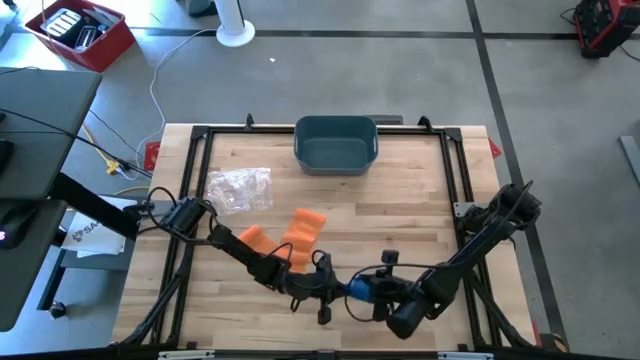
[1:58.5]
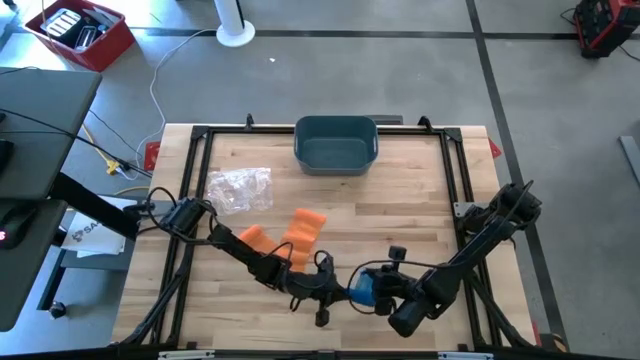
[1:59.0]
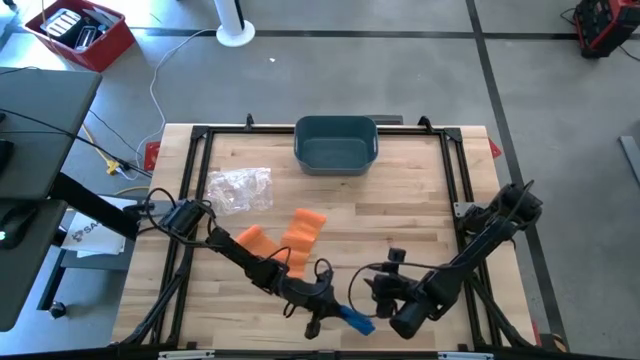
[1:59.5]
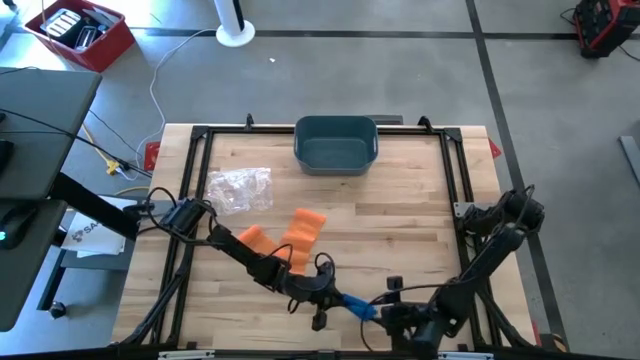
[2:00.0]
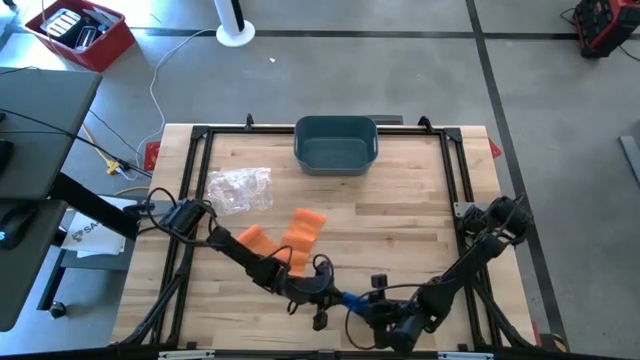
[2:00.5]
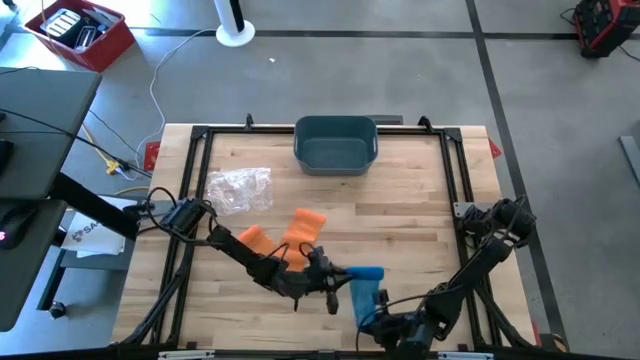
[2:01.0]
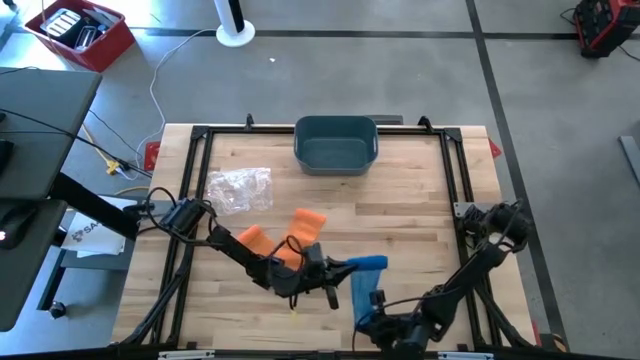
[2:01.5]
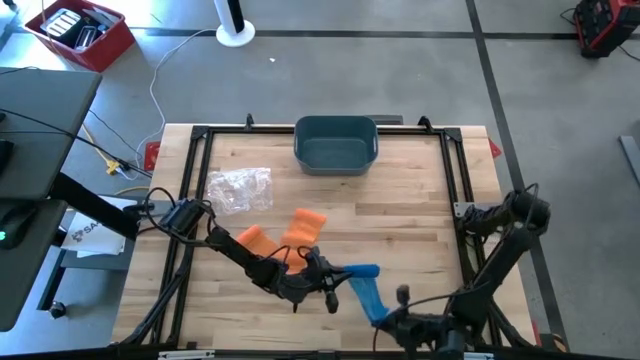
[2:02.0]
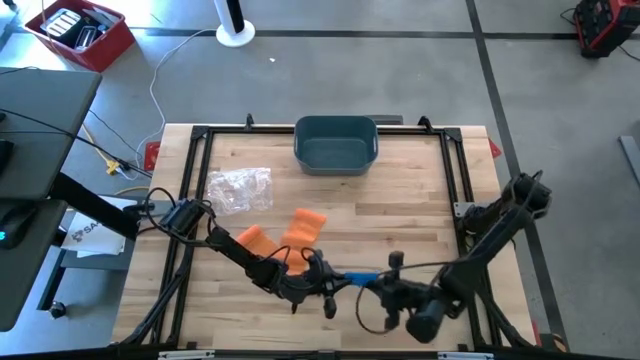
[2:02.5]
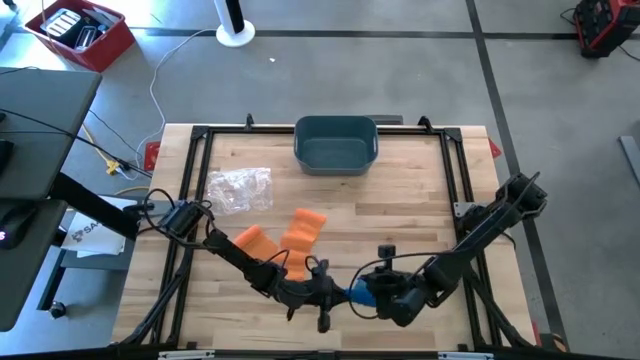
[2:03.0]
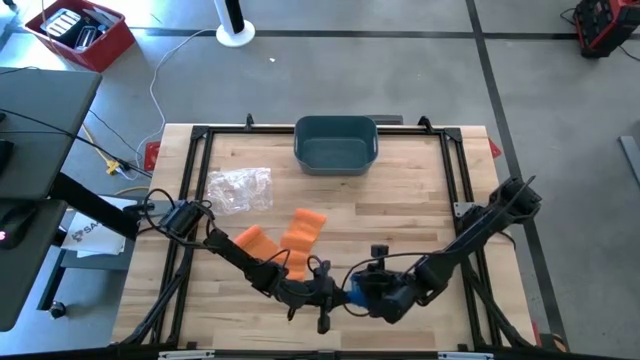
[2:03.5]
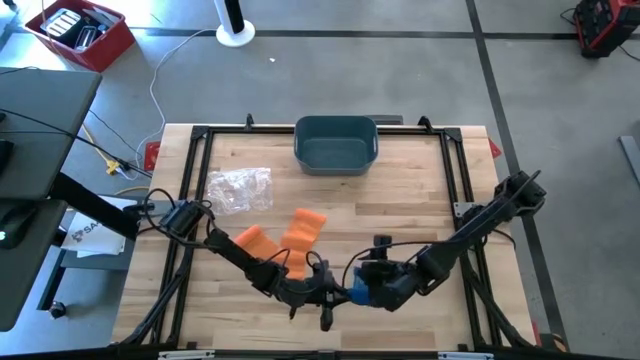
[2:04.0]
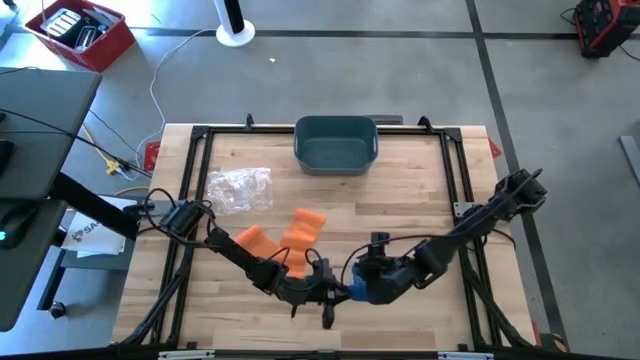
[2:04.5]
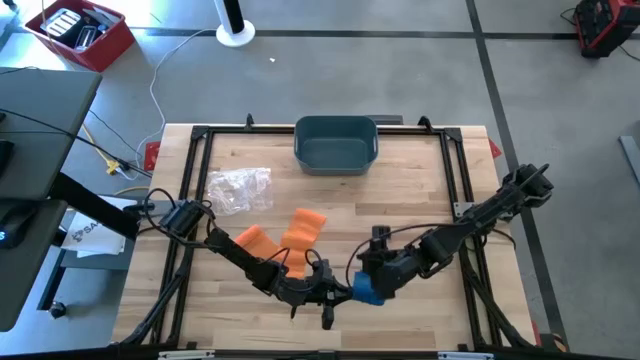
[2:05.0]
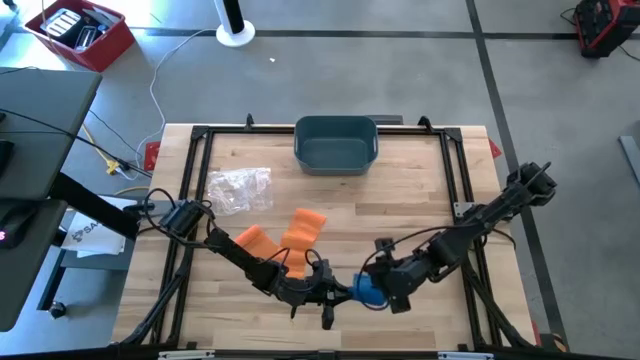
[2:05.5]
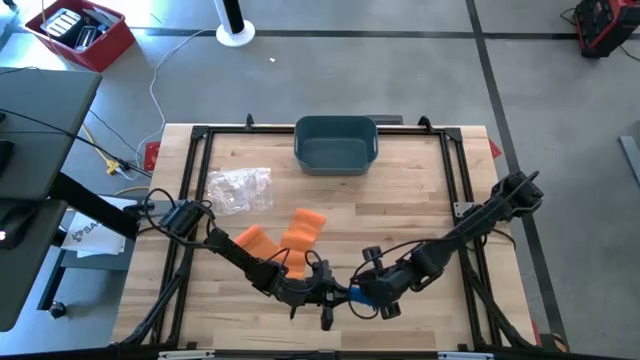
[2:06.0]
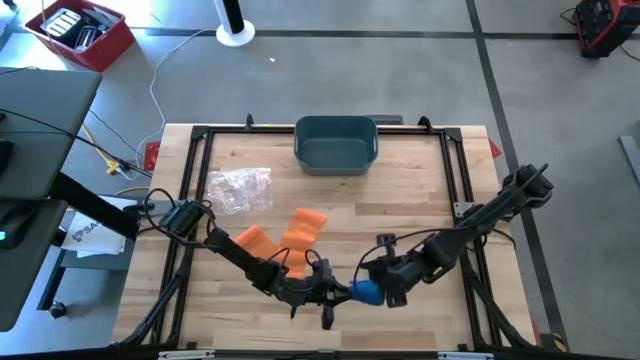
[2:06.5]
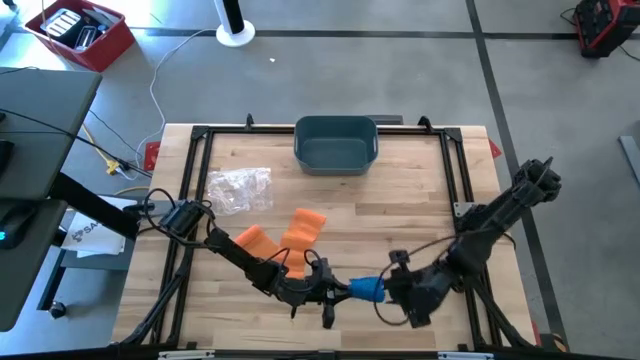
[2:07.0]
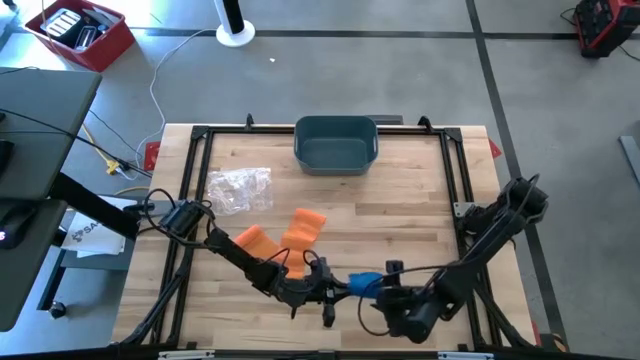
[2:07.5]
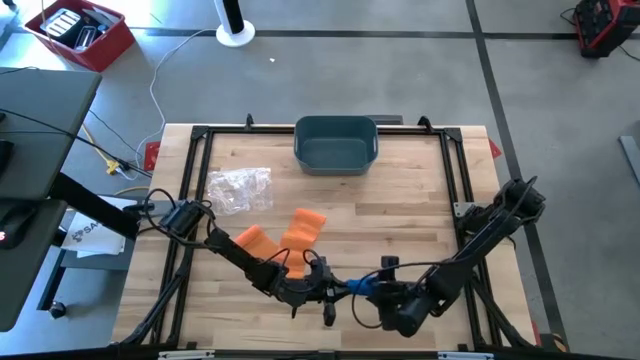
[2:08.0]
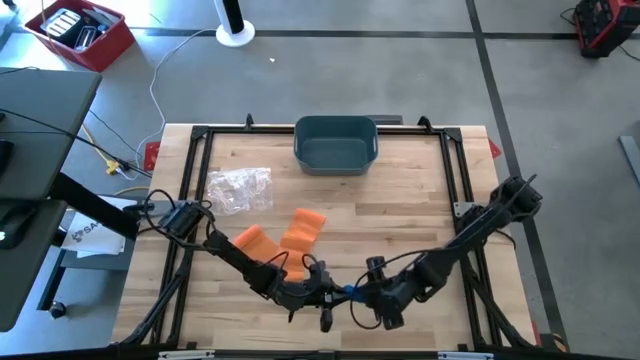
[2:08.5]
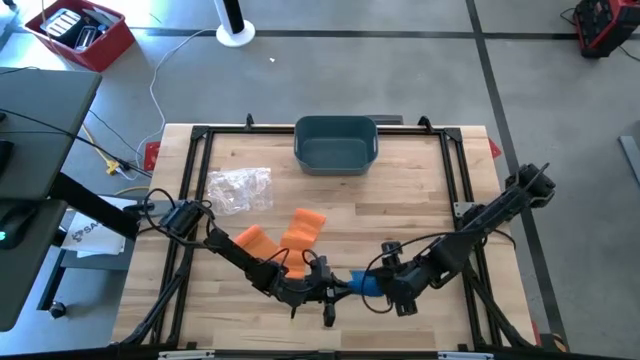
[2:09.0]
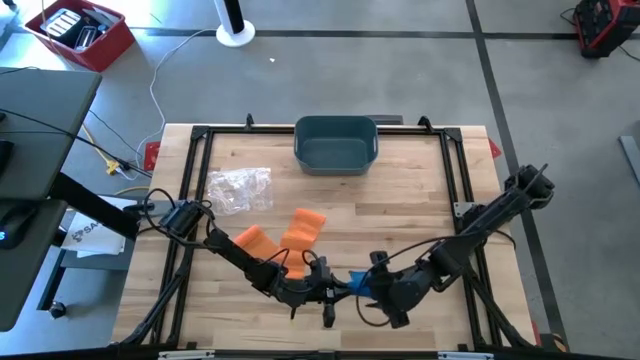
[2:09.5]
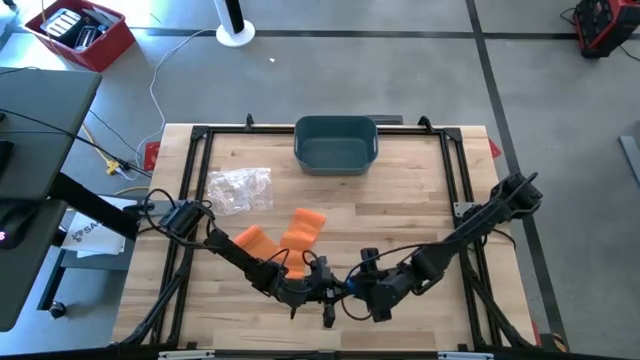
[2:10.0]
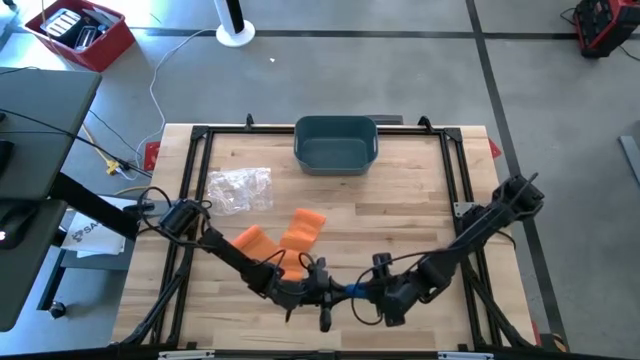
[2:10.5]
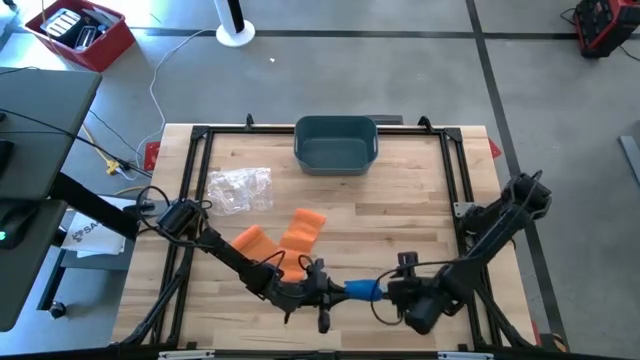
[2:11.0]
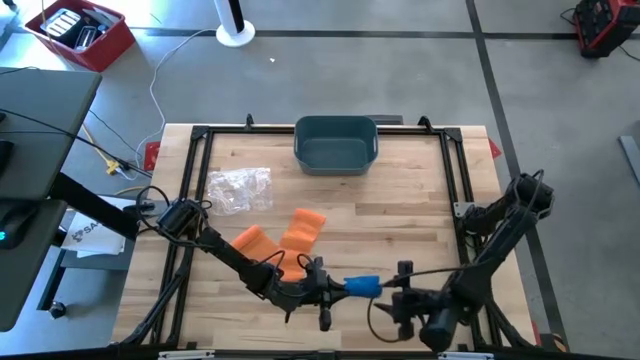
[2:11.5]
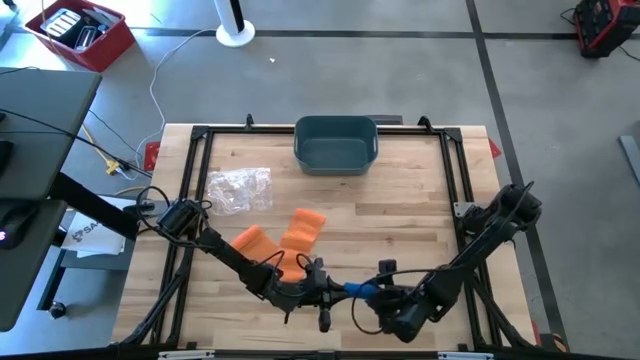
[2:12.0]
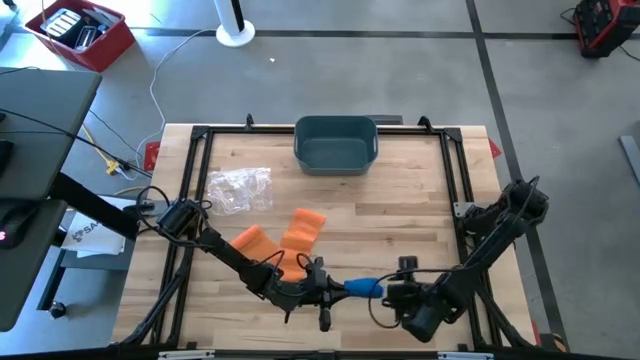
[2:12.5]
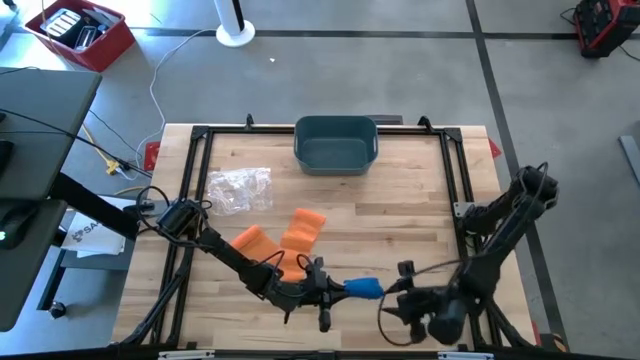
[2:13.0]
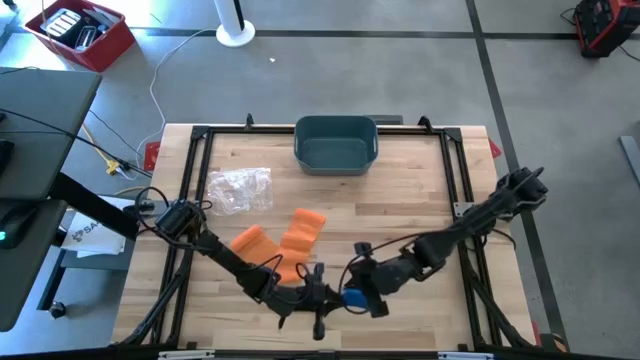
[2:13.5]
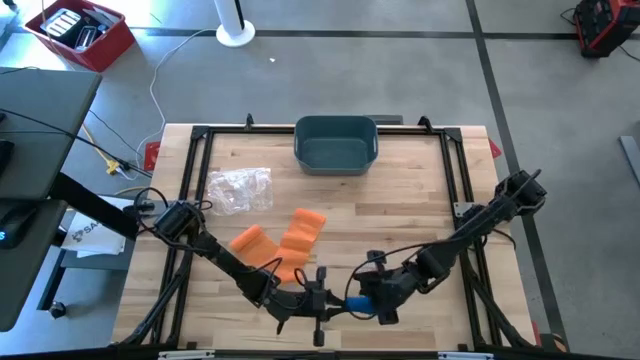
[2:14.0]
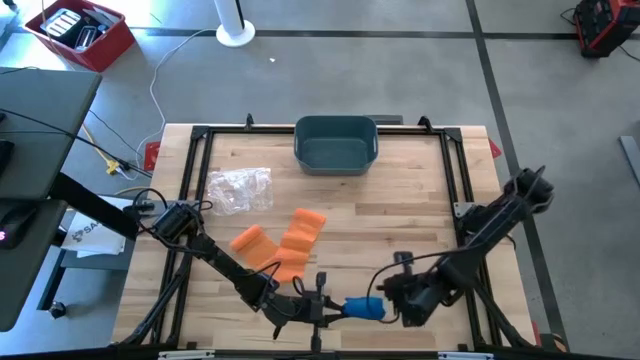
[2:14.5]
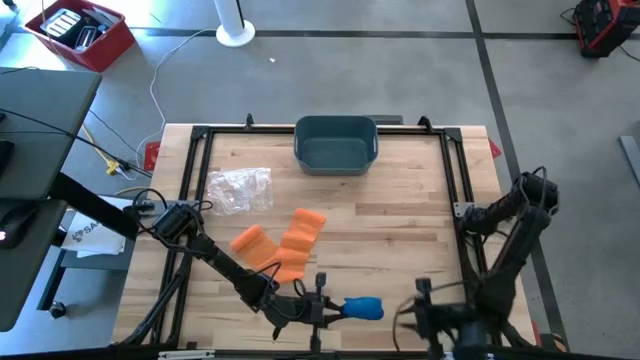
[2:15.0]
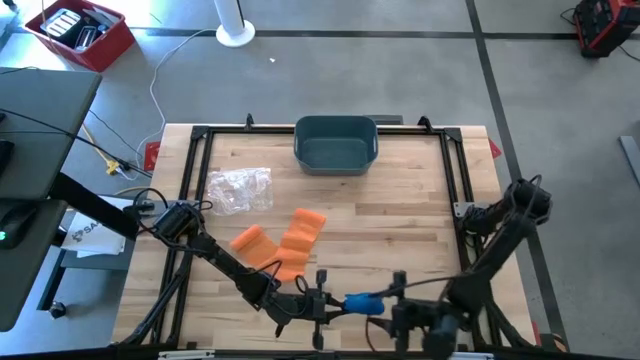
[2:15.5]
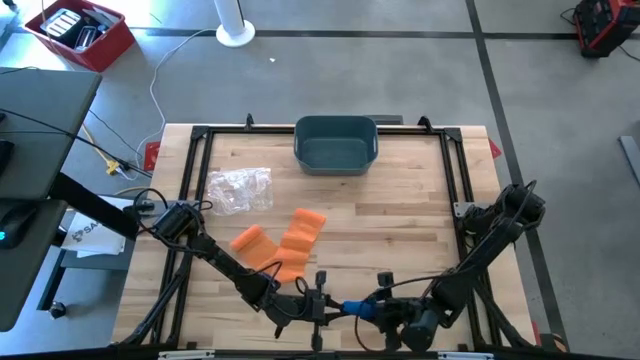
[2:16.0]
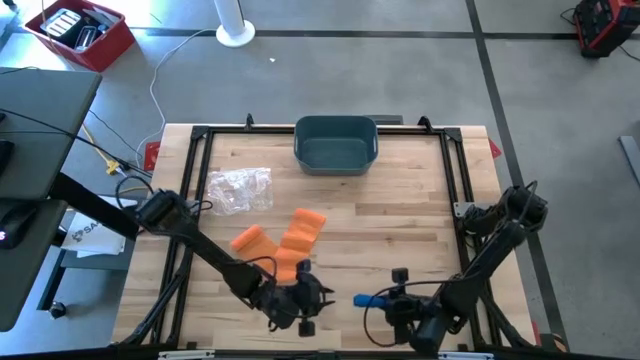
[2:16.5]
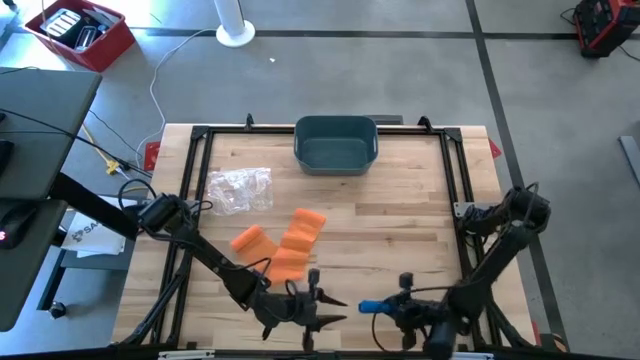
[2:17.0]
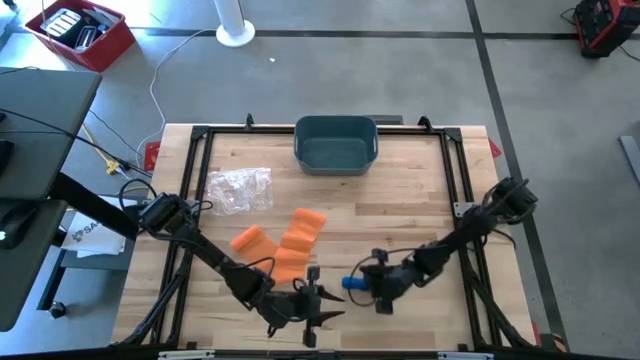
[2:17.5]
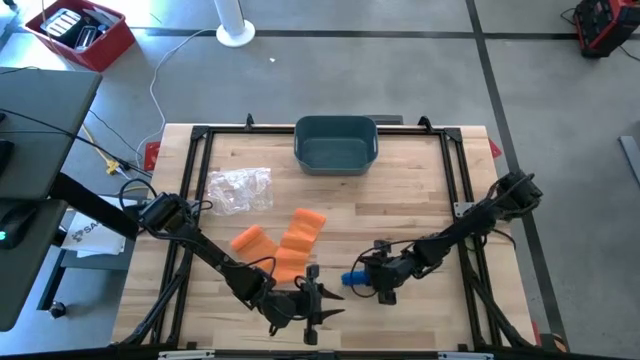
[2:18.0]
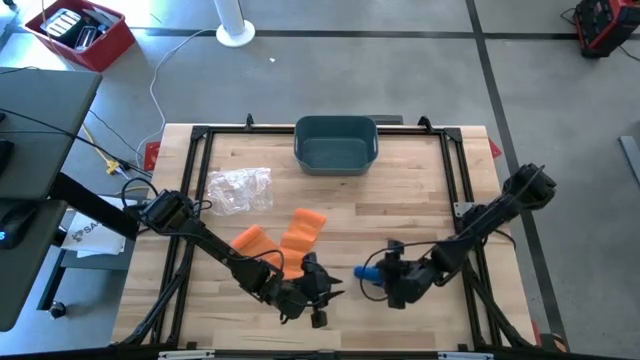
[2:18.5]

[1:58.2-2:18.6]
Task: Roll bandage
Roll the blue bandage
